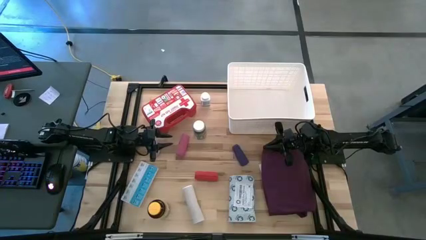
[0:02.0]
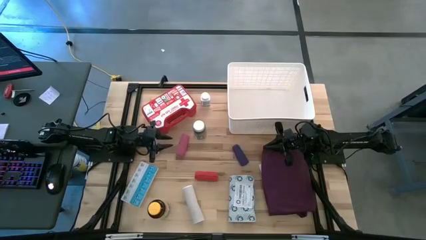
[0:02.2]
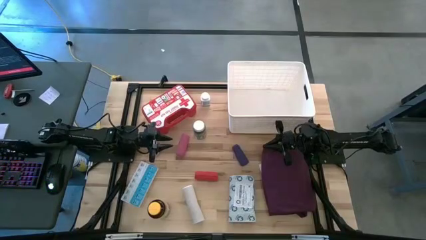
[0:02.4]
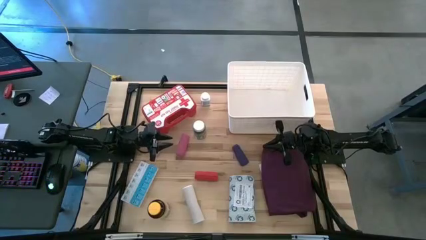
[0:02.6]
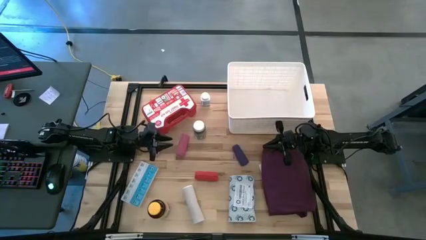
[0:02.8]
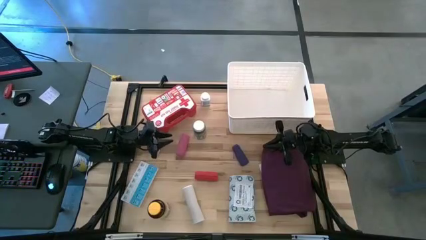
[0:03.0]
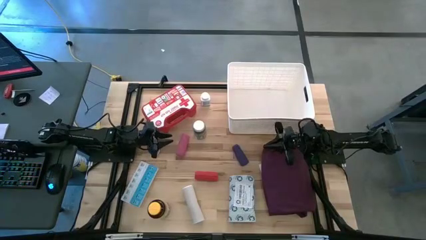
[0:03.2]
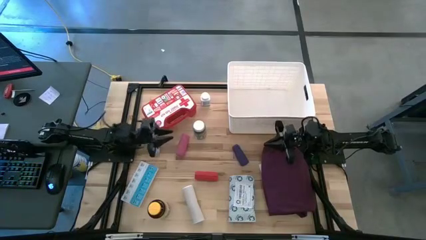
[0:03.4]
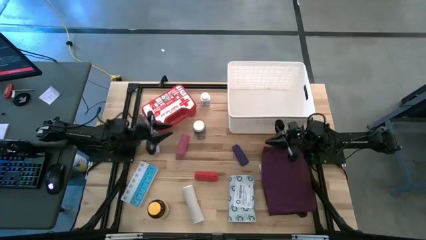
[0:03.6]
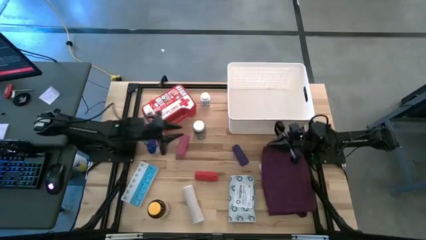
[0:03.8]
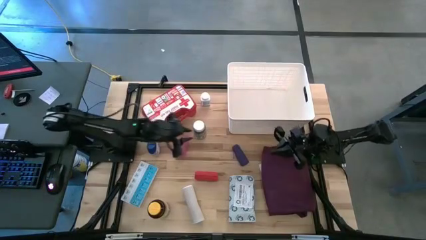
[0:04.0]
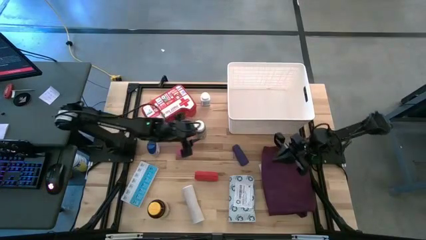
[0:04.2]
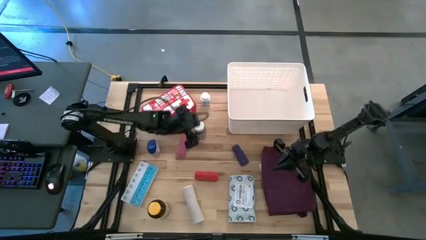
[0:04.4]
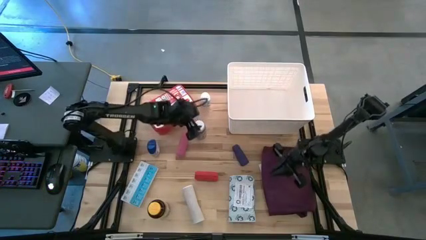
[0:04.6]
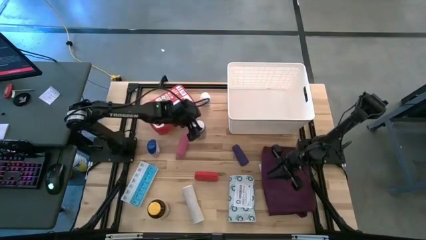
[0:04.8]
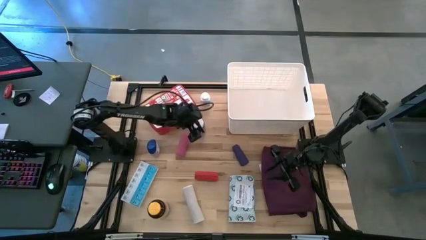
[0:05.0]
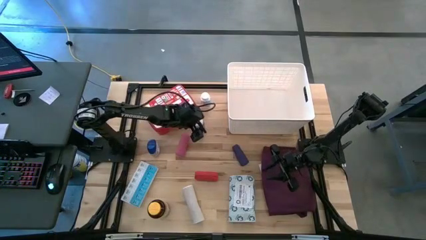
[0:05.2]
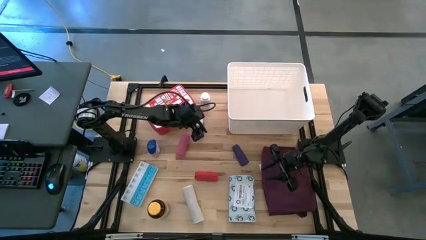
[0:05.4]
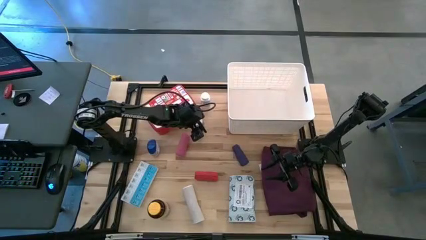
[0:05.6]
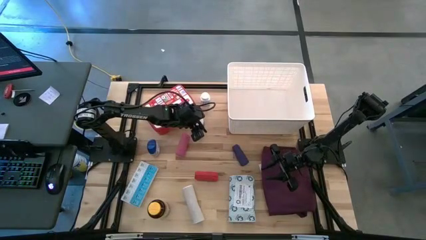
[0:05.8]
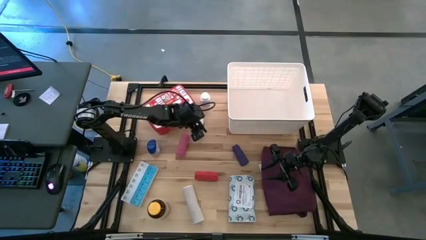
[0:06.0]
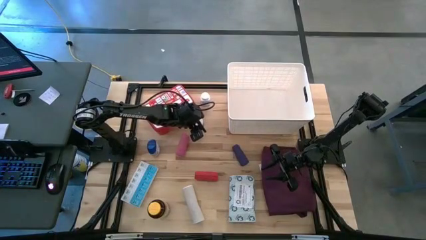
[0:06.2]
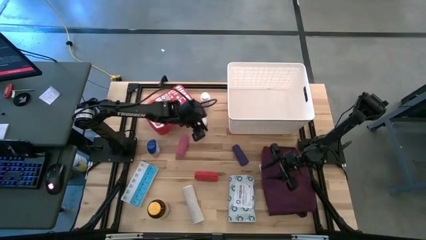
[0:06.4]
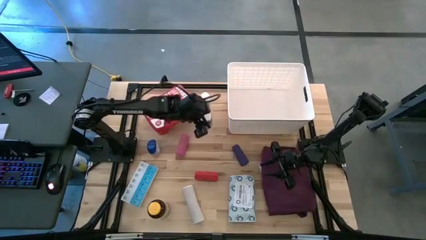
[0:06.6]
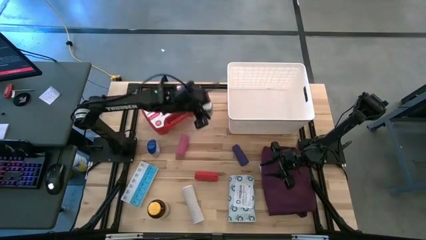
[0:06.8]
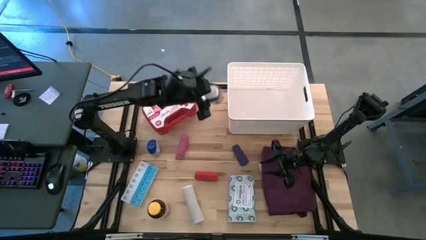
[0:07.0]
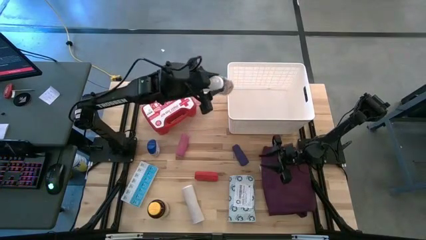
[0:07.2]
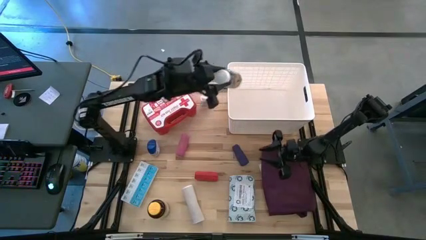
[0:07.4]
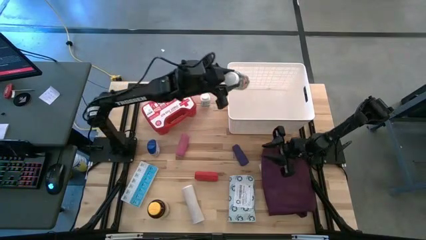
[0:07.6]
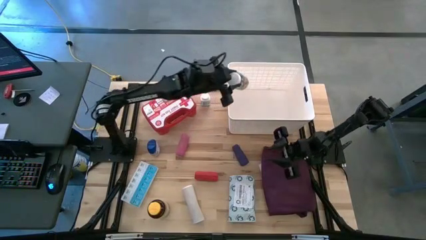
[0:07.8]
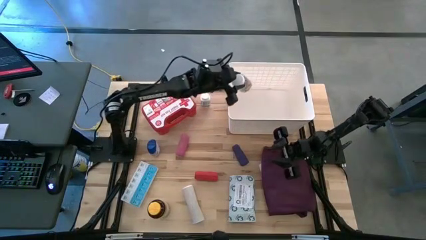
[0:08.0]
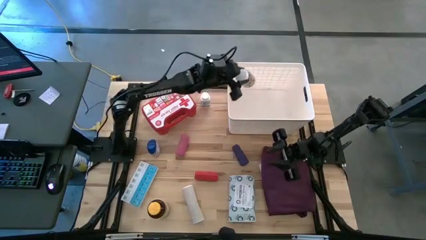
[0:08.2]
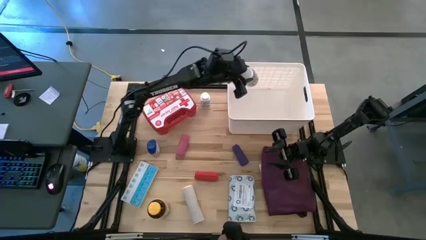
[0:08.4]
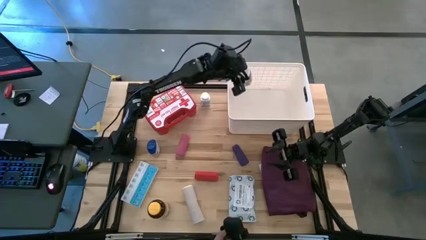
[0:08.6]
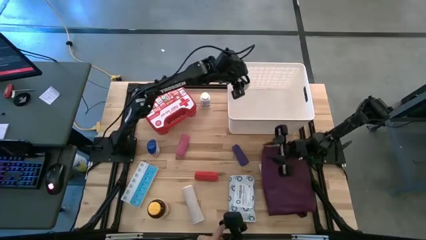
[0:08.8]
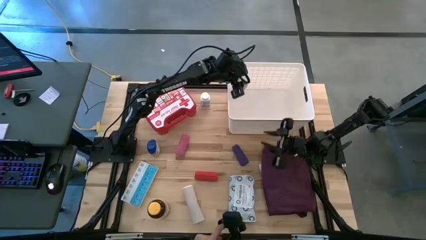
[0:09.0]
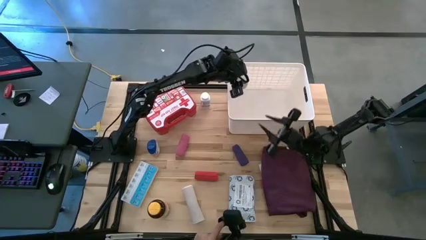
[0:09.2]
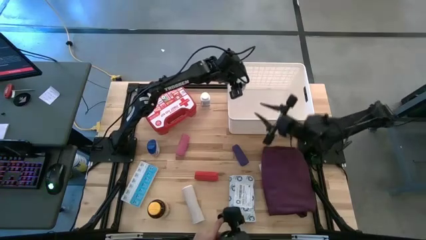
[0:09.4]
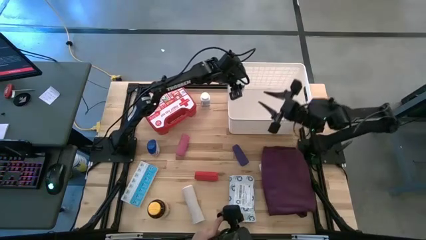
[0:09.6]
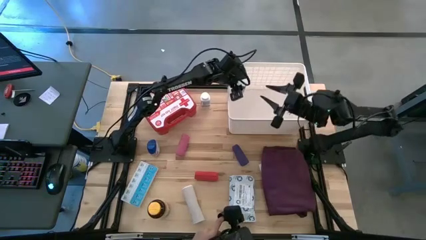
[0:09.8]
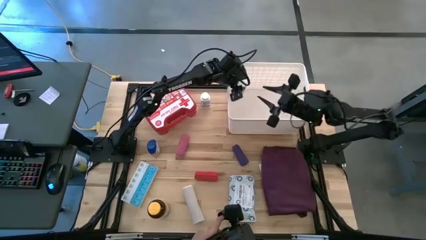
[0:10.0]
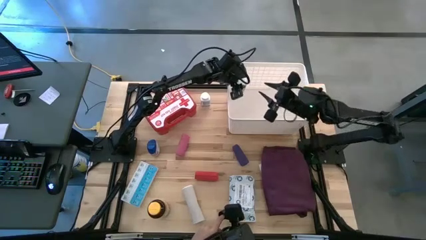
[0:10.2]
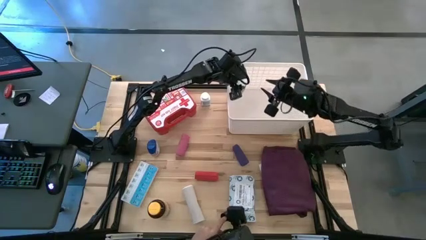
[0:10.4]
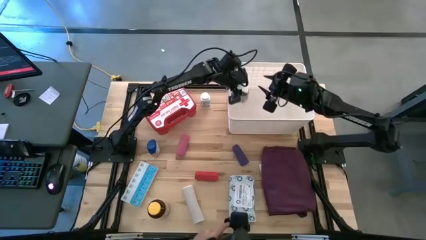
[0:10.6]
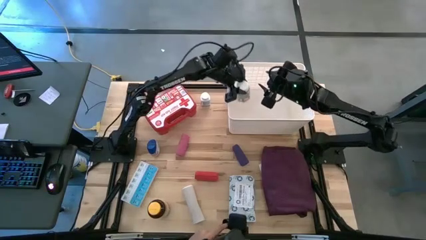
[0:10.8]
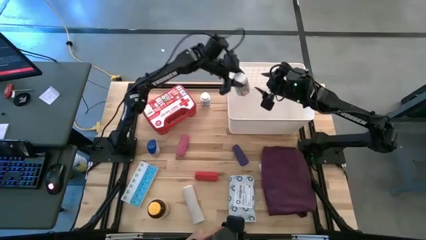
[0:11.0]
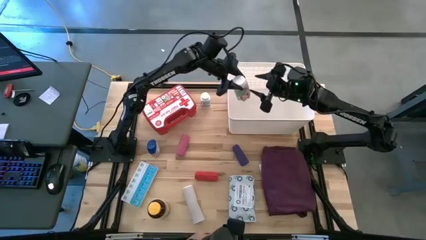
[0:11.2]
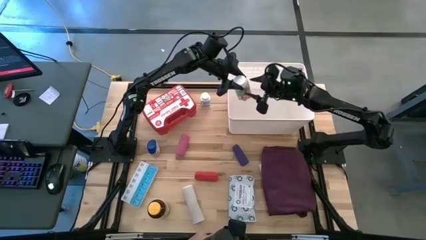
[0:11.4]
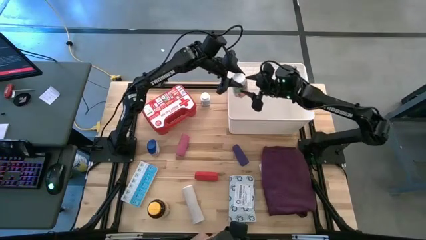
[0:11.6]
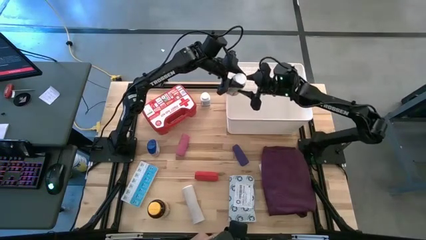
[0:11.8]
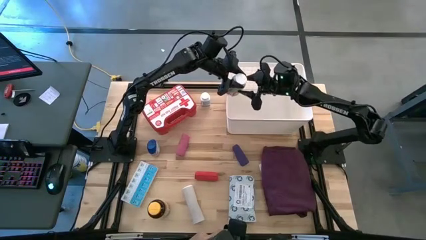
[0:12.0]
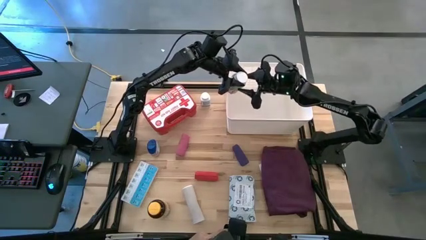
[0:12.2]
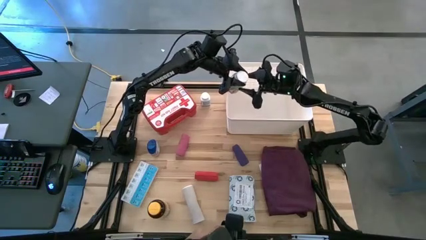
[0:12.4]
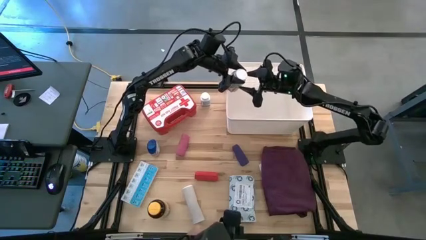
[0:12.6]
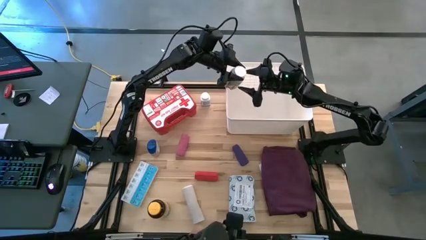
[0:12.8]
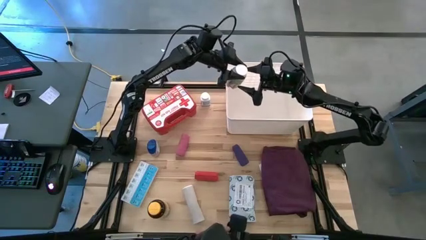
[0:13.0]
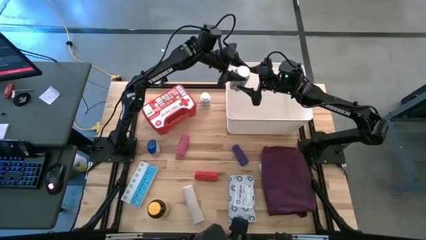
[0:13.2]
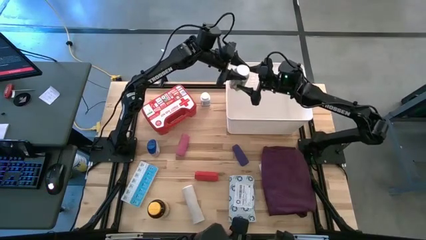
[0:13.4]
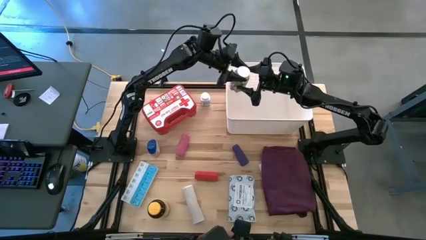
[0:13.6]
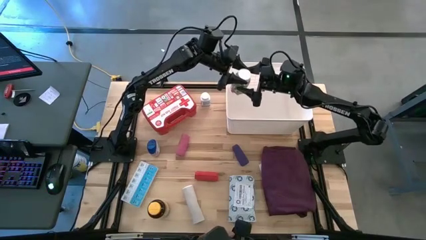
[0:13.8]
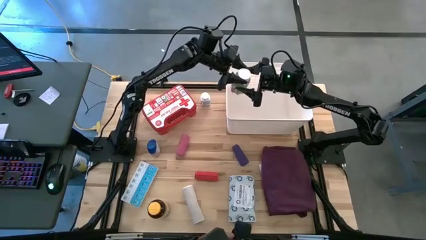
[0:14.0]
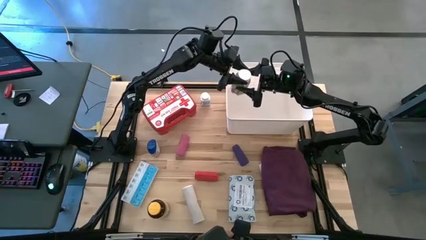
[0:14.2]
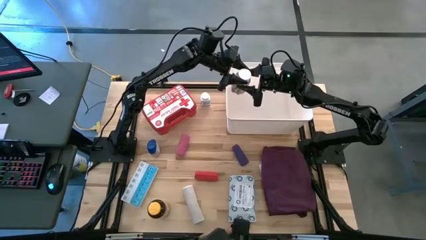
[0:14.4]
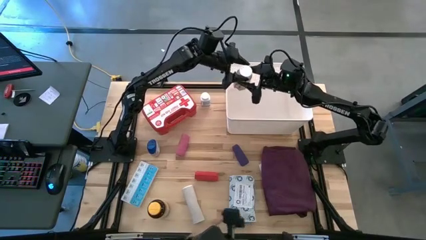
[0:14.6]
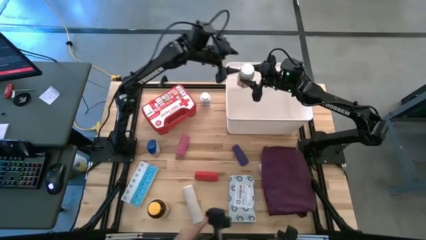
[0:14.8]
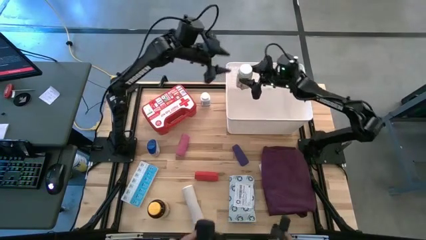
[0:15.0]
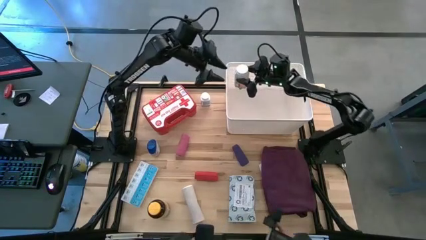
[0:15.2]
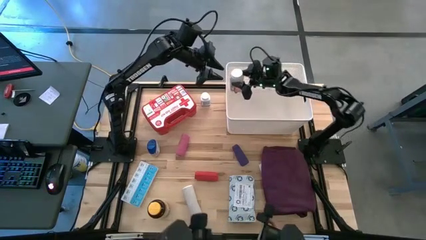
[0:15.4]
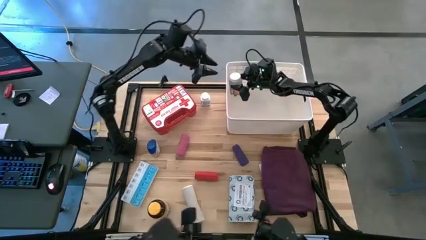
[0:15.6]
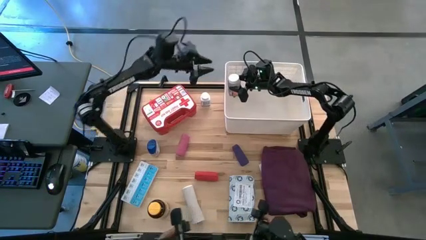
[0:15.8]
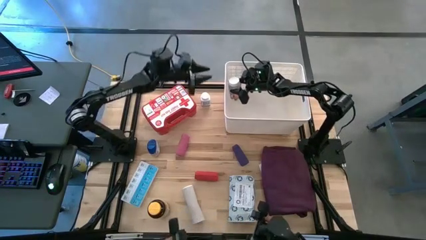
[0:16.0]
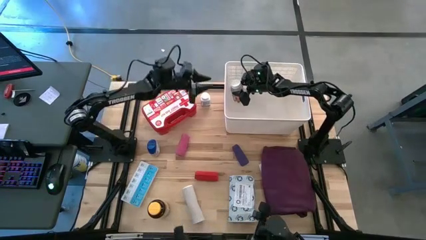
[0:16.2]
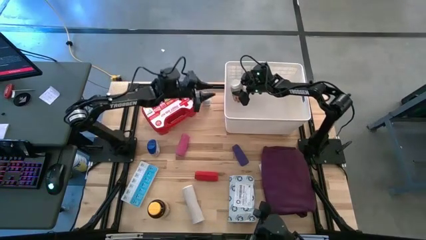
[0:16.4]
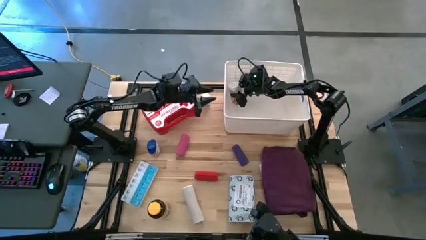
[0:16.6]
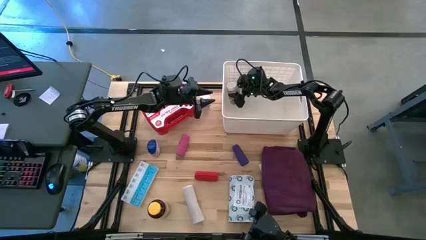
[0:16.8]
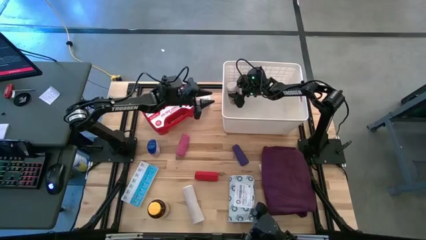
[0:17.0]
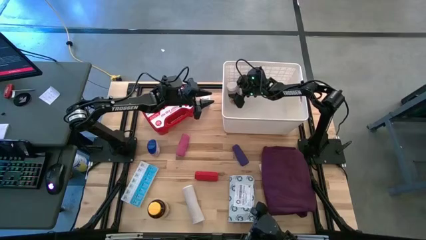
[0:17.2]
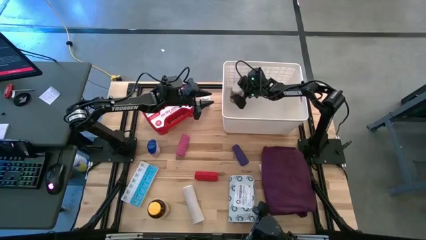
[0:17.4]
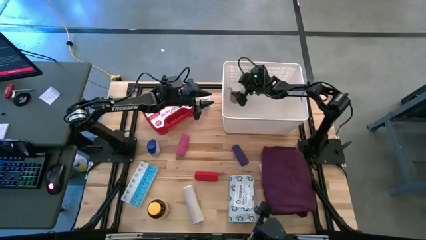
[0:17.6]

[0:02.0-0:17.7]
Task: Pick & place medical supplies in basket/bin
Put the bottom white medicine bottle into the white container
